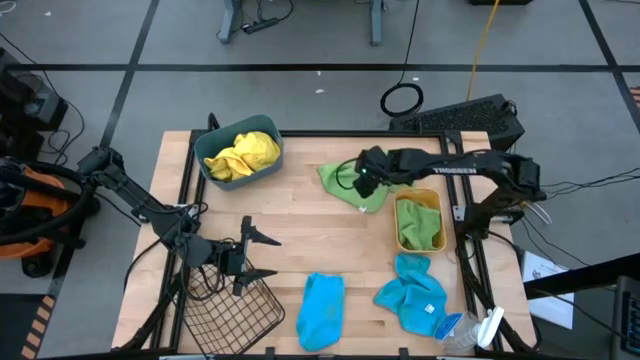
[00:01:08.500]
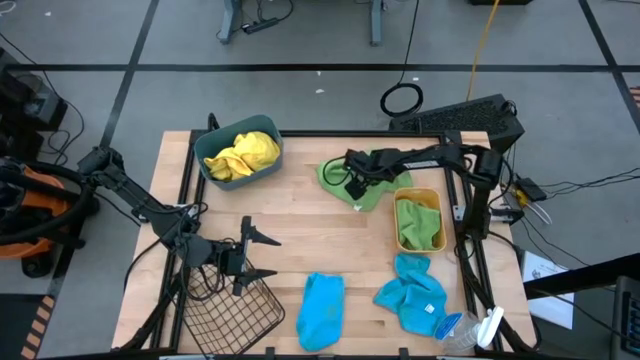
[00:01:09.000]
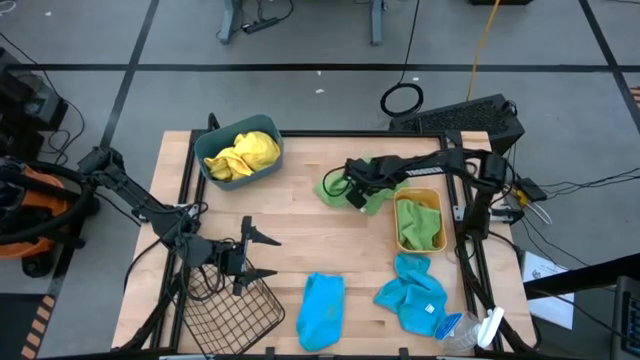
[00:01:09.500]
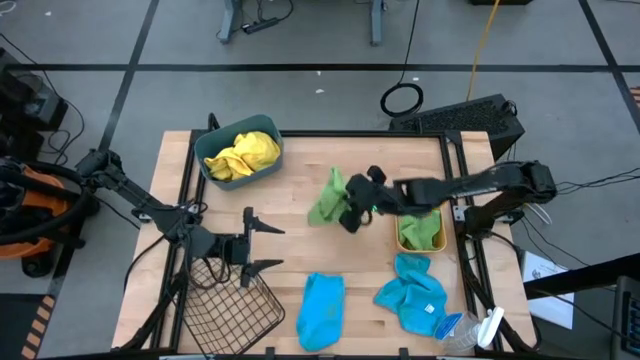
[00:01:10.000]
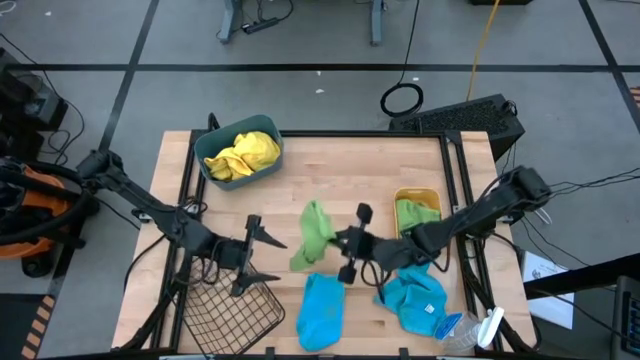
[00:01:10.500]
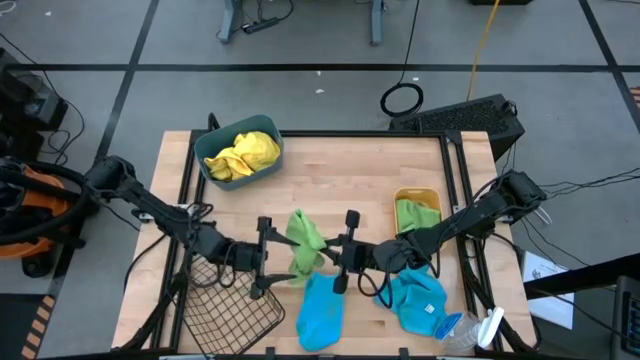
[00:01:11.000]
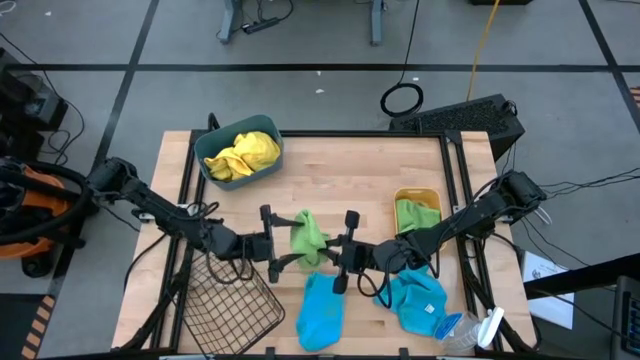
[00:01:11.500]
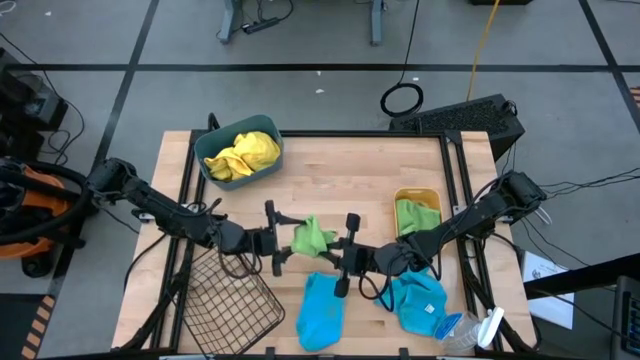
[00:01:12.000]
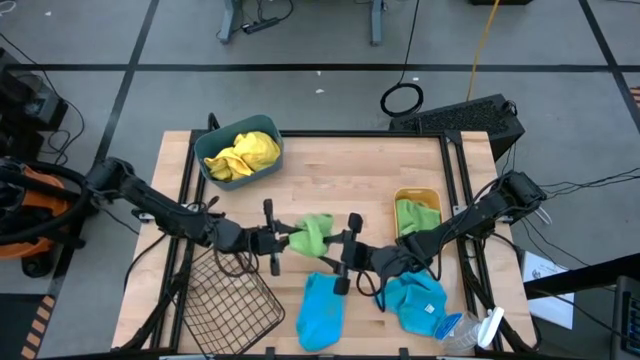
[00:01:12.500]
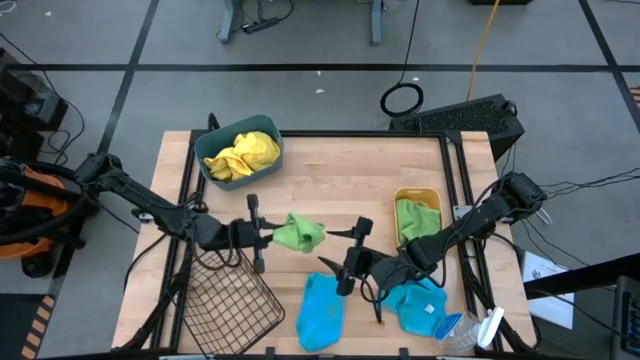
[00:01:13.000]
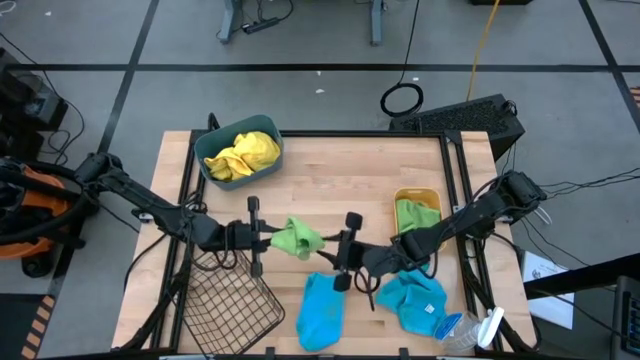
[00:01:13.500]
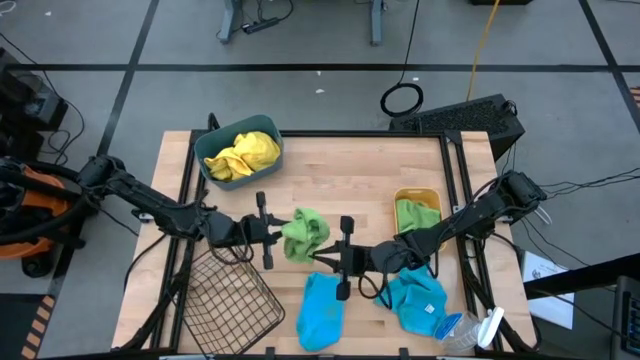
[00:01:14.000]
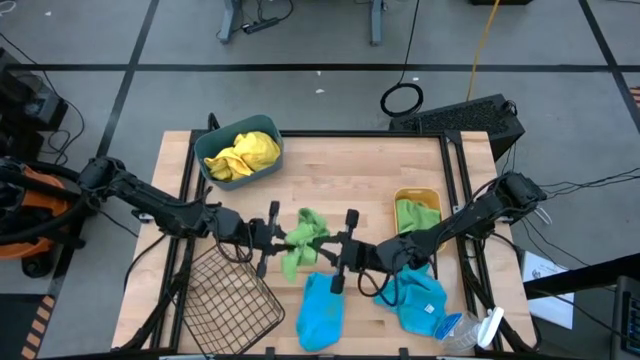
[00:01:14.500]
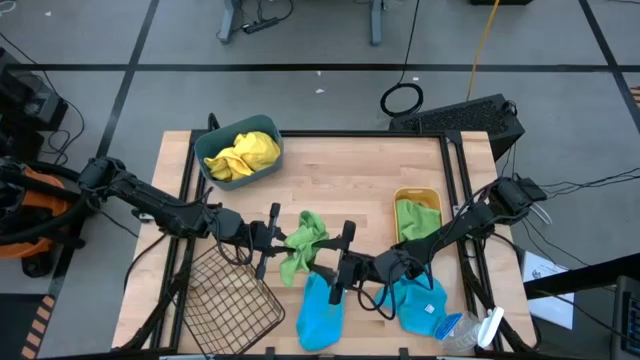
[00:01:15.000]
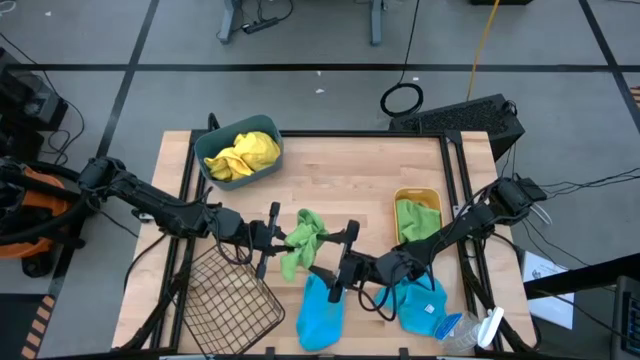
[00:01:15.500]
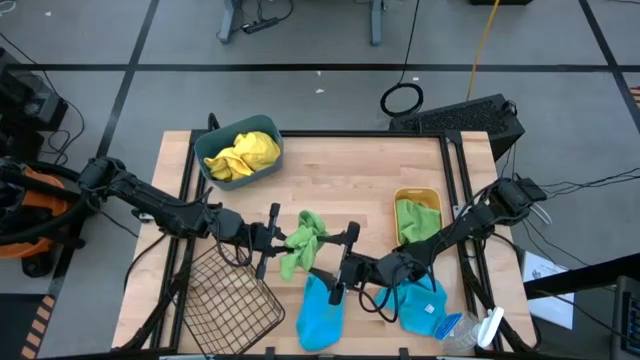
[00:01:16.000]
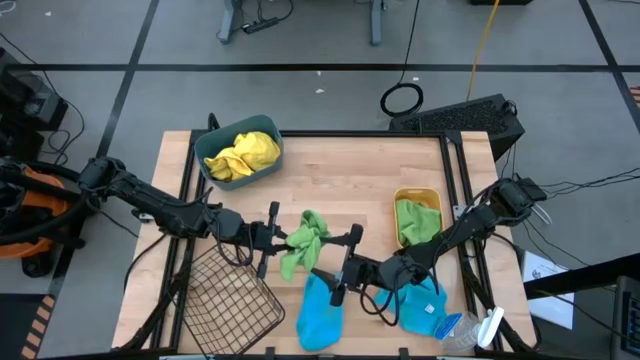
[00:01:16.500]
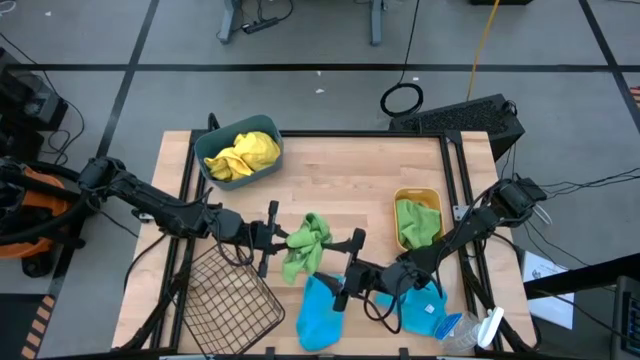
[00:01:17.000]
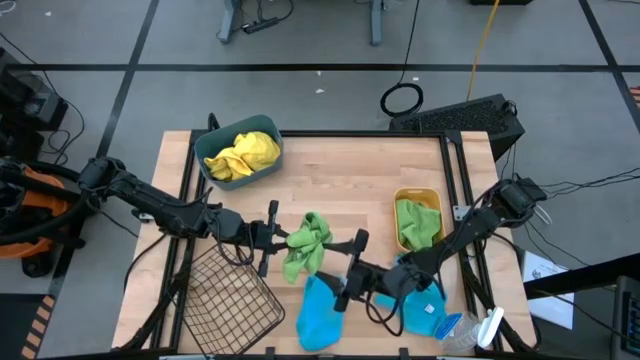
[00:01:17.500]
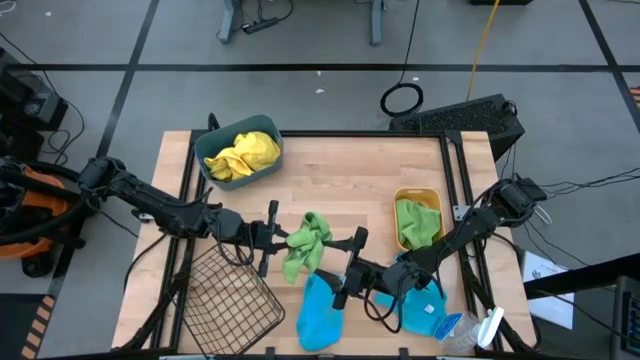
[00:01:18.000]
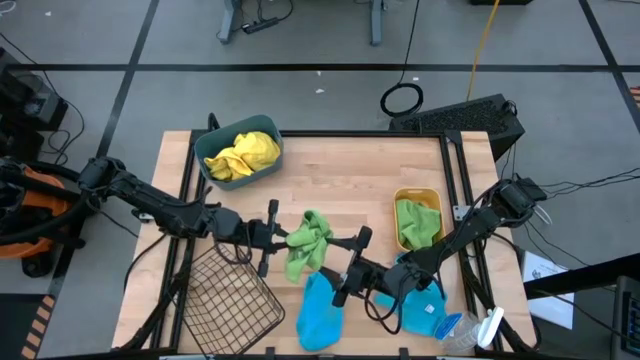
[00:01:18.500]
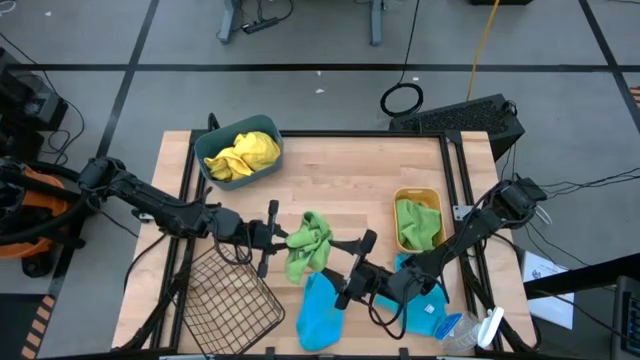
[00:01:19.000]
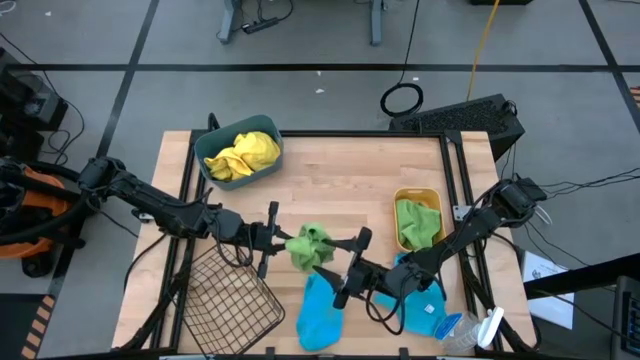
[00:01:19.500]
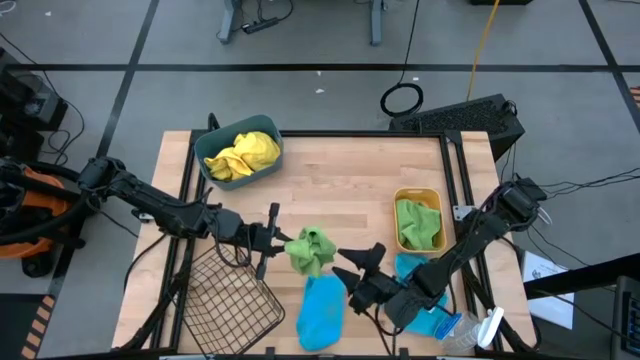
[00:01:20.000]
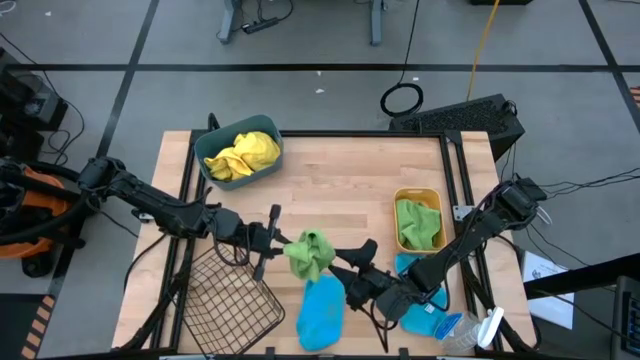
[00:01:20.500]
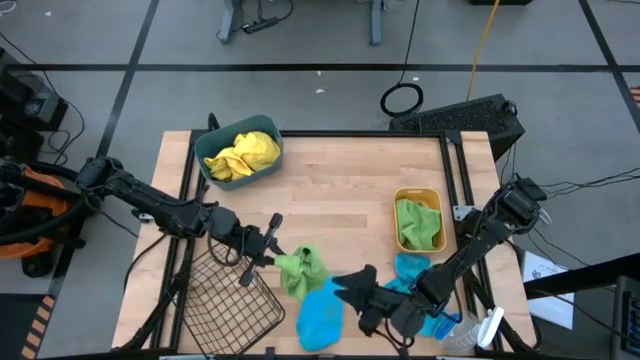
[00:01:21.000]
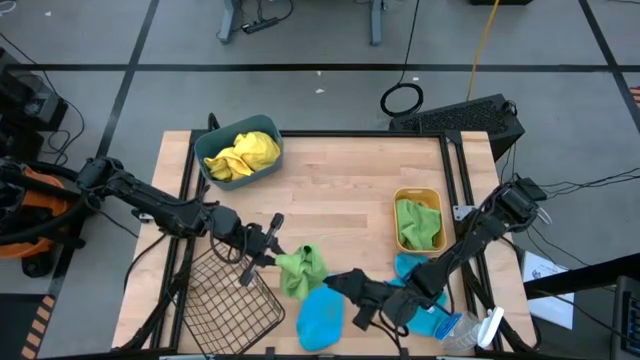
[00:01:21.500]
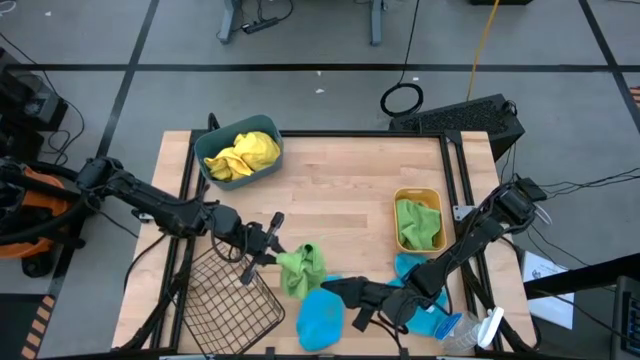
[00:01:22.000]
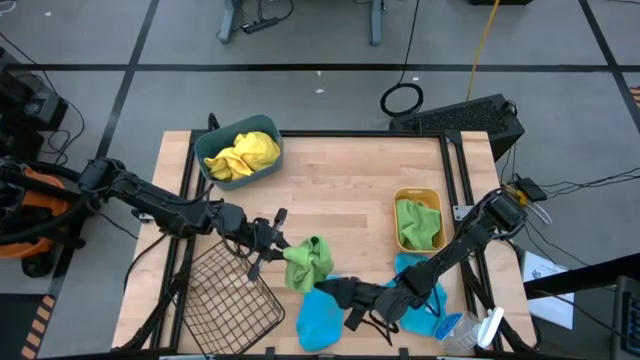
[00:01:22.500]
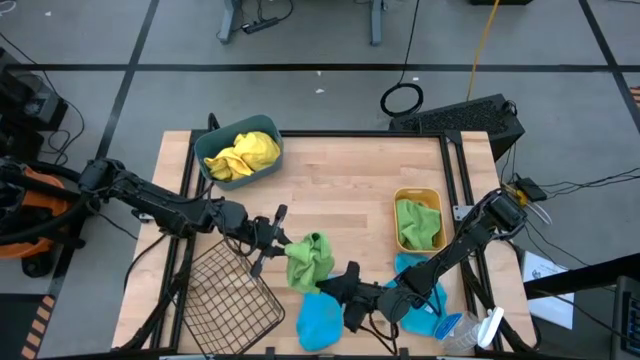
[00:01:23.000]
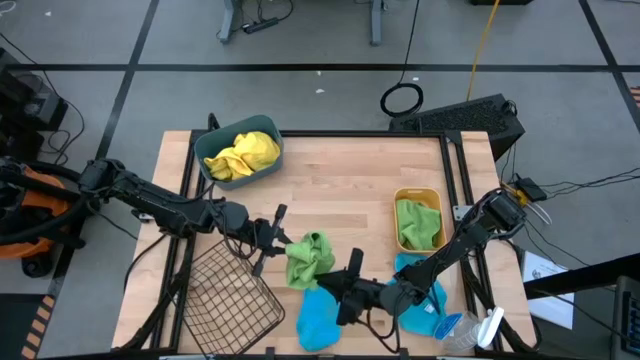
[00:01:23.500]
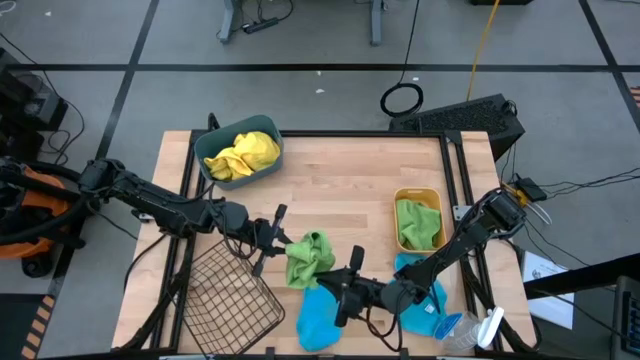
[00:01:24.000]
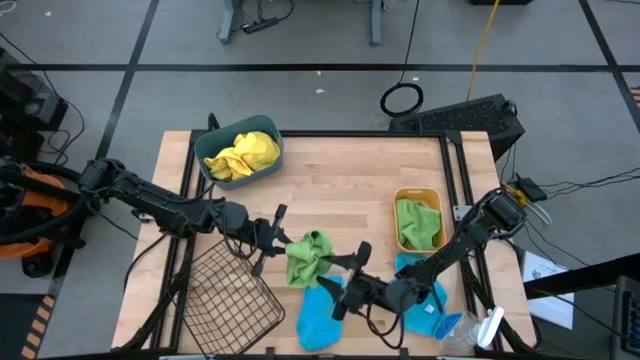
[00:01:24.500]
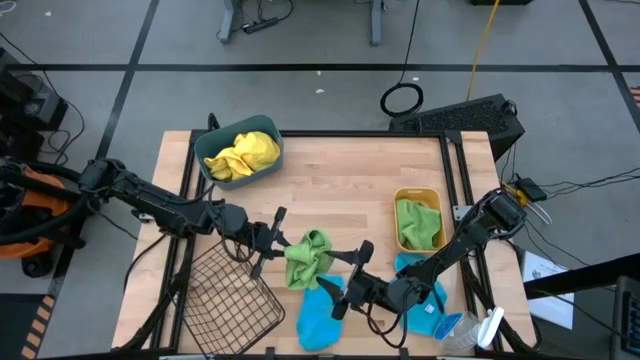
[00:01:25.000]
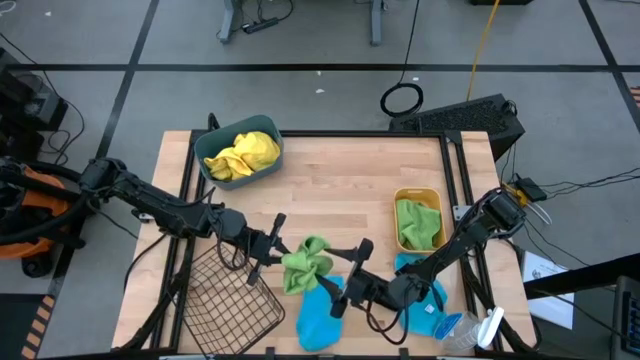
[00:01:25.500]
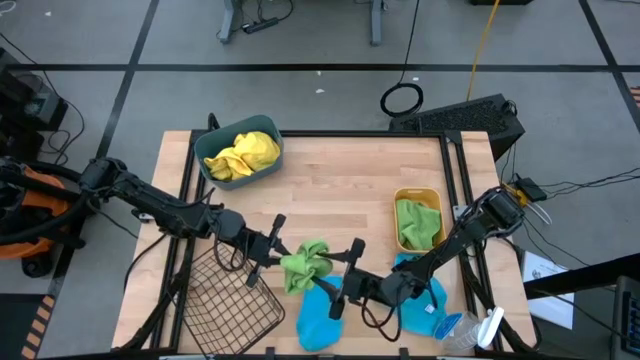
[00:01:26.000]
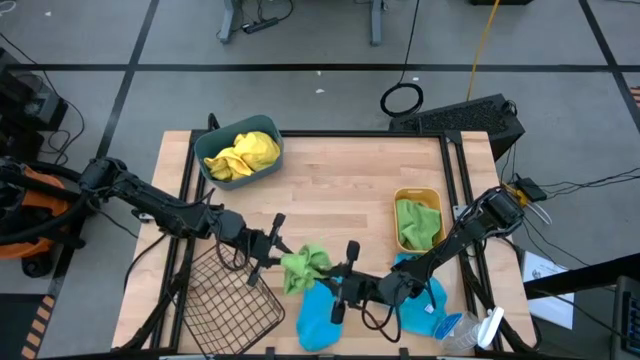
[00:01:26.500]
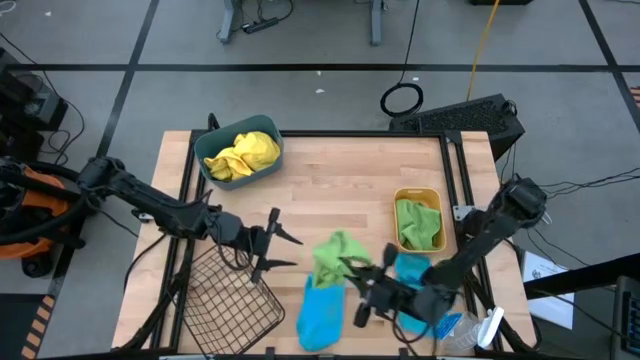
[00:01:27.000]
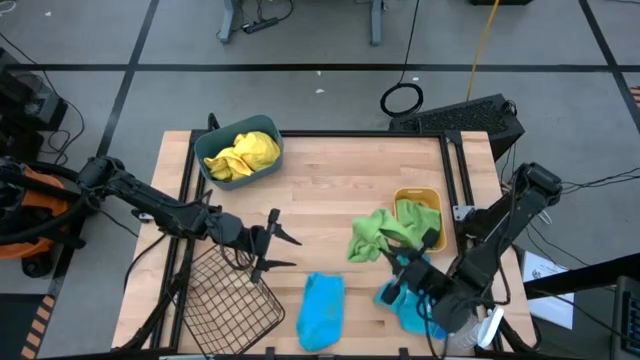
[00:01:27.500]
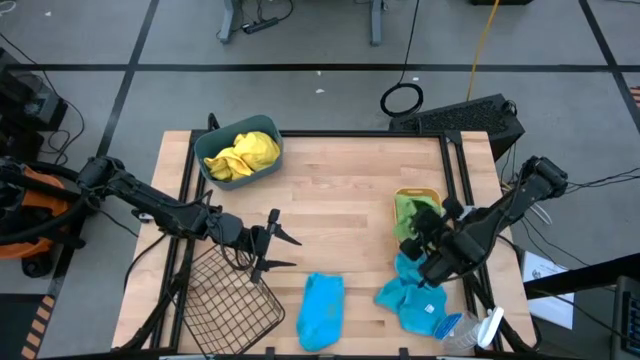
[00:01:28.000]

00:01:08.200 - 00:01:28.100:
Task: Sort microfiber towel by color & place in baskets
Roll upper right green towel

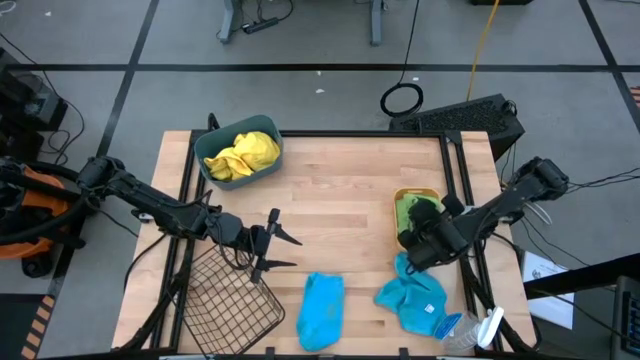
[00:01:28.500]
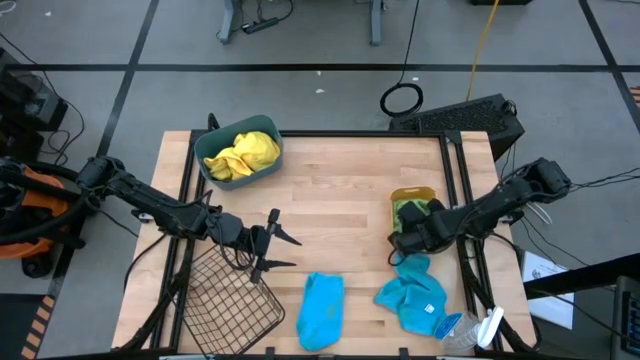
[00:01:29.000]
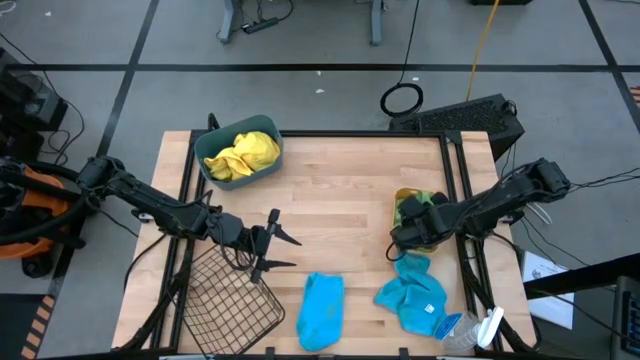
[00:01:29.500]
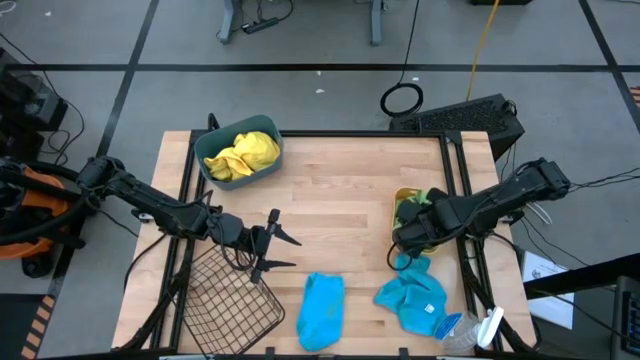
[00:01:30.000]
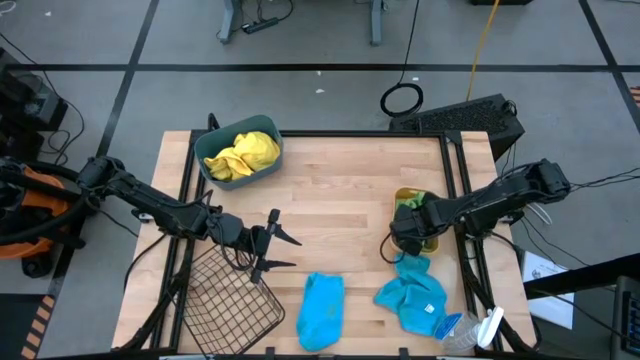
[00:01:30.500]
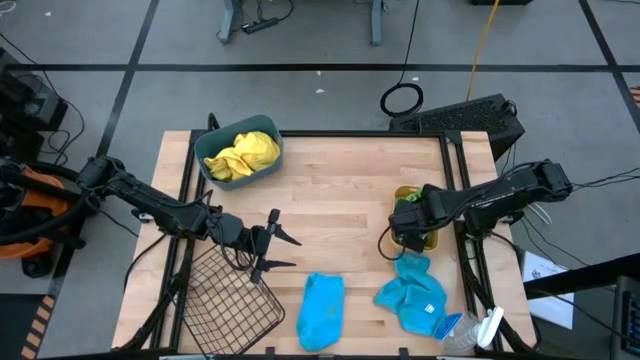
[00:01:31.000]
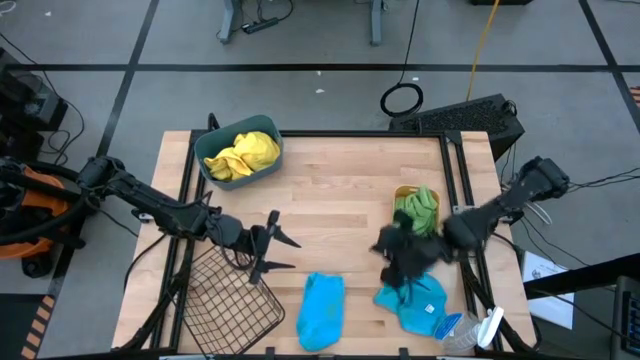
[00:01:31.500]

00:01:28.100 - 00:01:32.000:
Put upper right green towel into the orange bin
